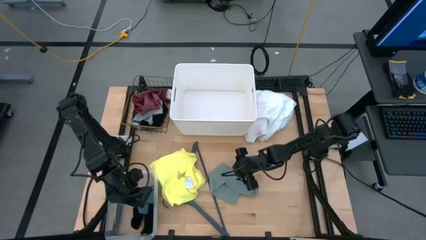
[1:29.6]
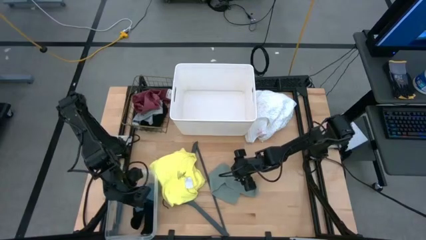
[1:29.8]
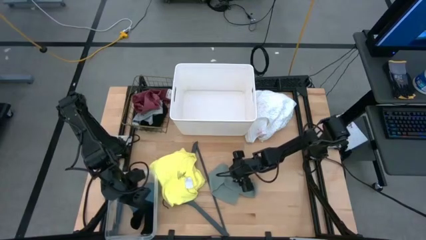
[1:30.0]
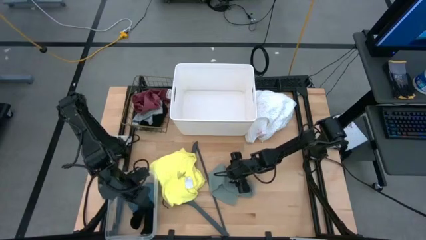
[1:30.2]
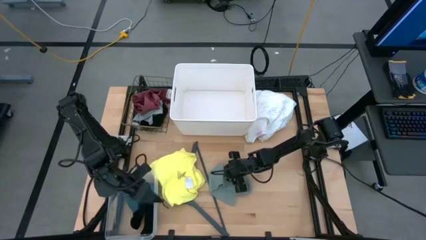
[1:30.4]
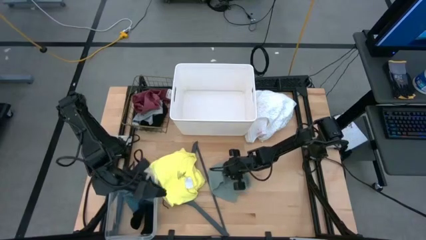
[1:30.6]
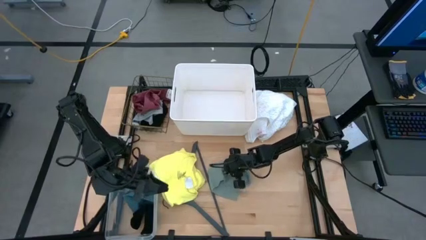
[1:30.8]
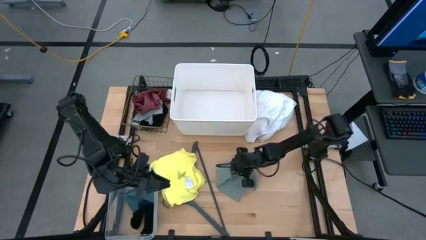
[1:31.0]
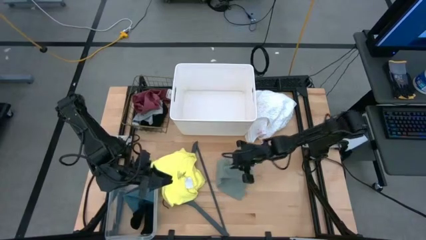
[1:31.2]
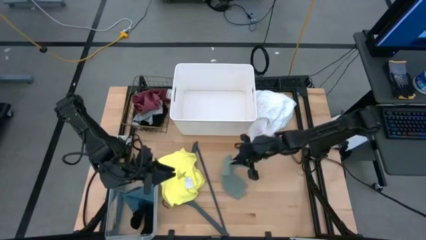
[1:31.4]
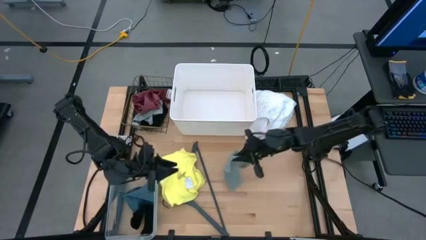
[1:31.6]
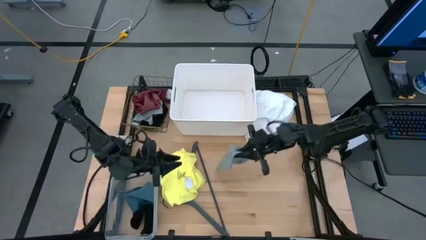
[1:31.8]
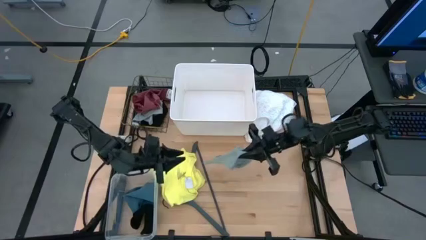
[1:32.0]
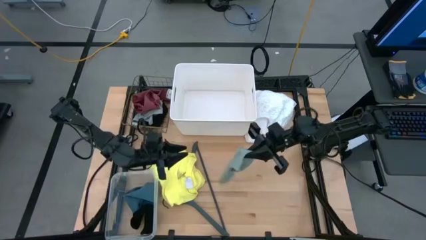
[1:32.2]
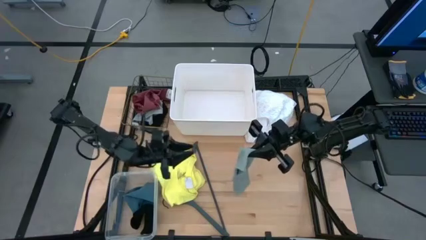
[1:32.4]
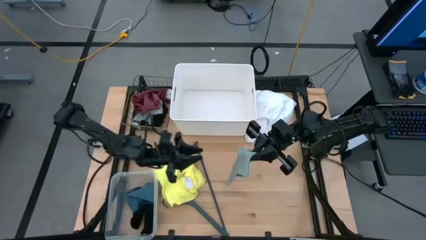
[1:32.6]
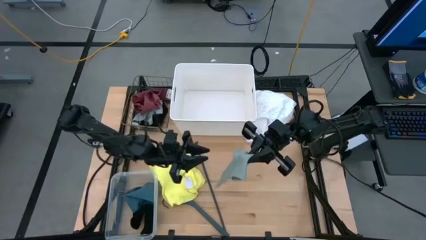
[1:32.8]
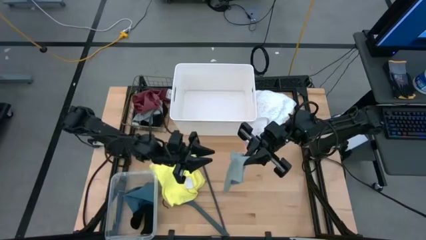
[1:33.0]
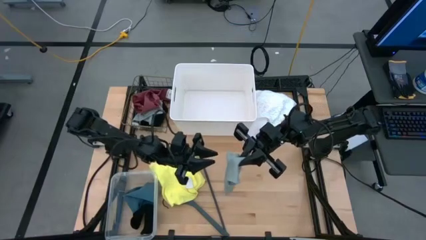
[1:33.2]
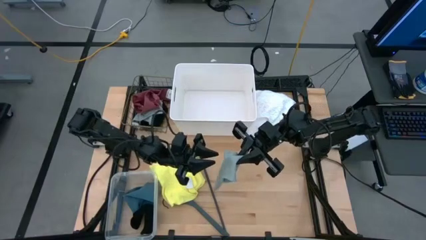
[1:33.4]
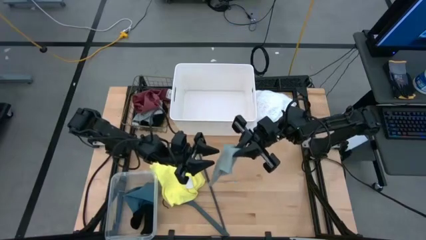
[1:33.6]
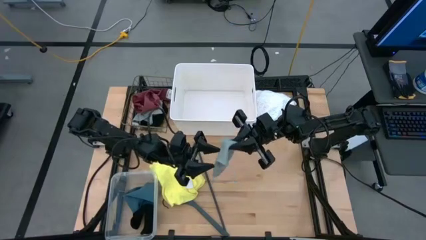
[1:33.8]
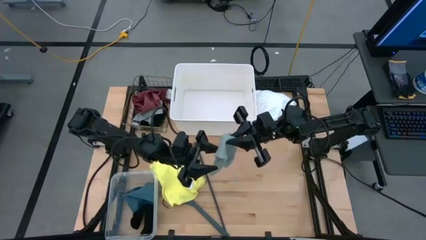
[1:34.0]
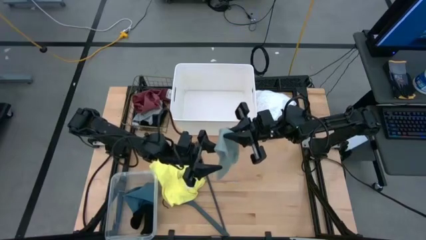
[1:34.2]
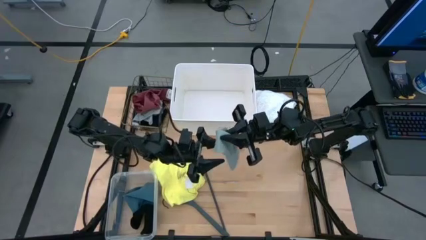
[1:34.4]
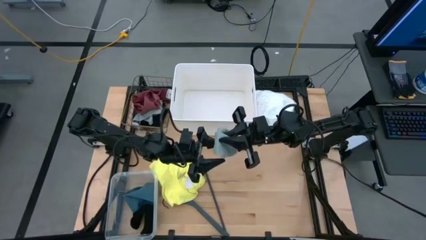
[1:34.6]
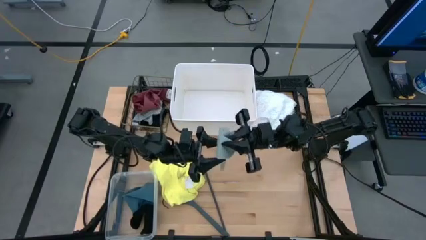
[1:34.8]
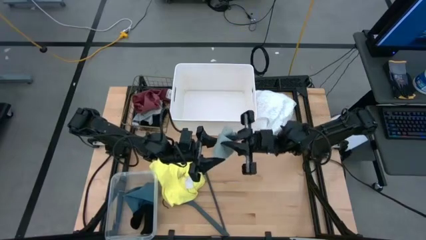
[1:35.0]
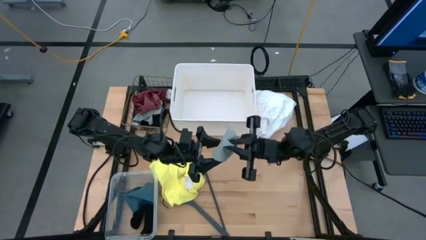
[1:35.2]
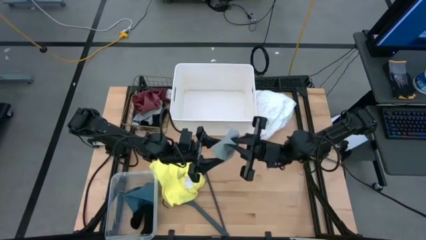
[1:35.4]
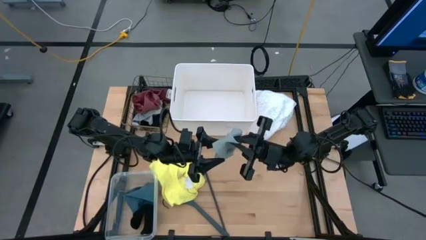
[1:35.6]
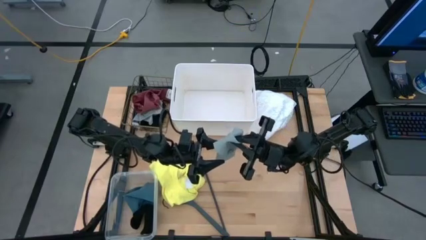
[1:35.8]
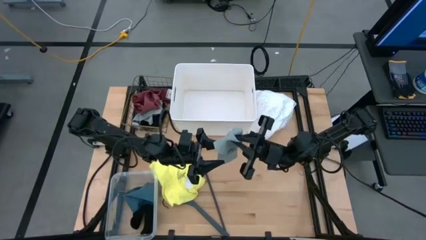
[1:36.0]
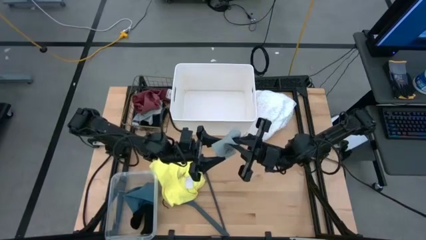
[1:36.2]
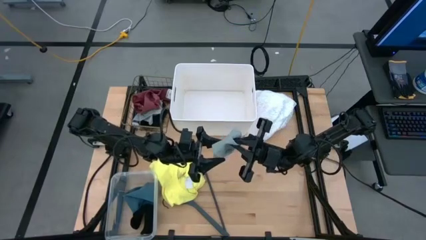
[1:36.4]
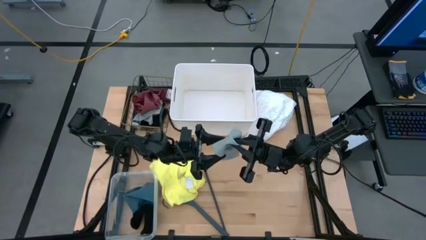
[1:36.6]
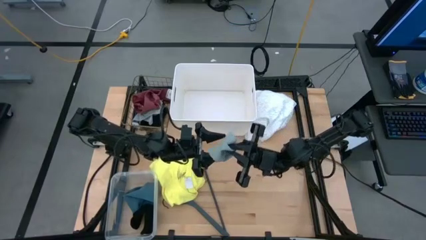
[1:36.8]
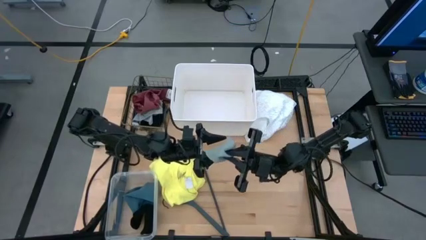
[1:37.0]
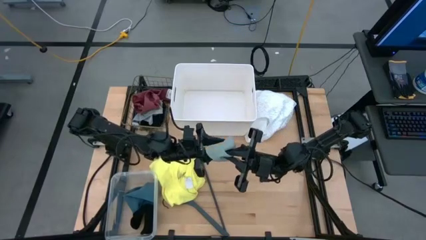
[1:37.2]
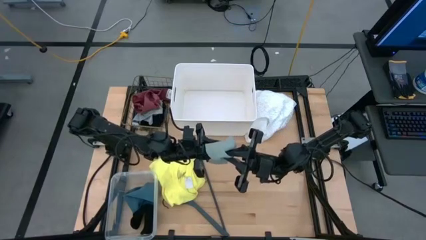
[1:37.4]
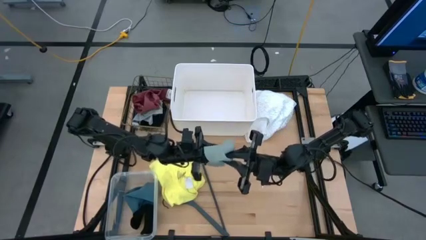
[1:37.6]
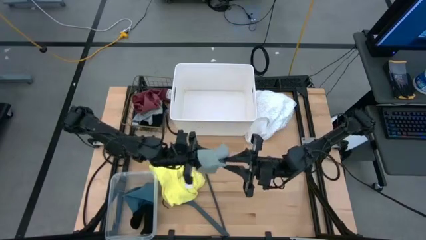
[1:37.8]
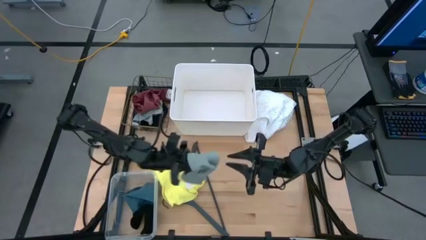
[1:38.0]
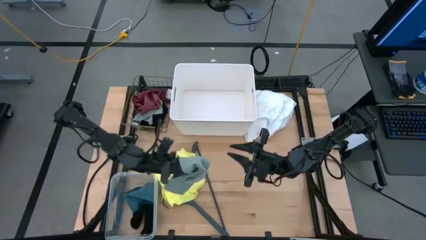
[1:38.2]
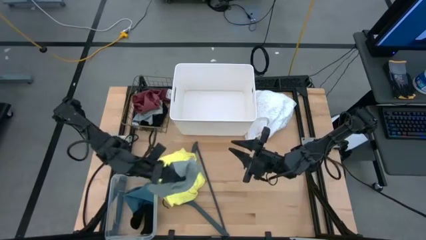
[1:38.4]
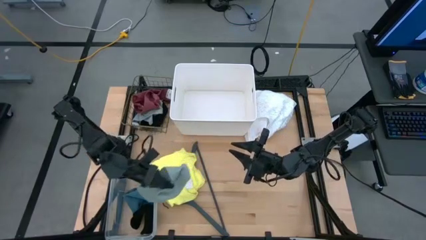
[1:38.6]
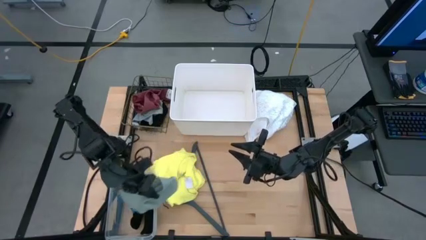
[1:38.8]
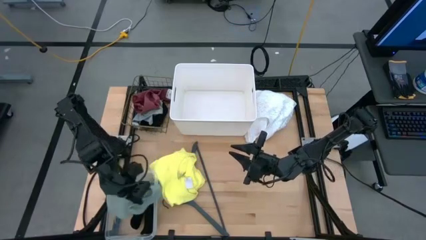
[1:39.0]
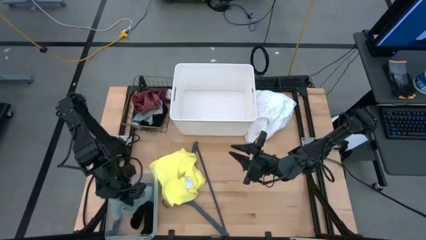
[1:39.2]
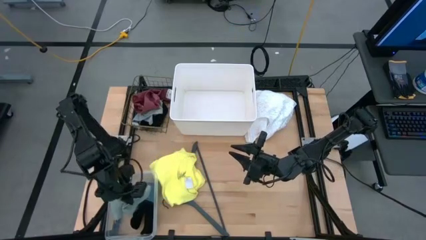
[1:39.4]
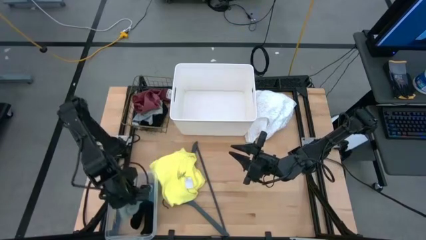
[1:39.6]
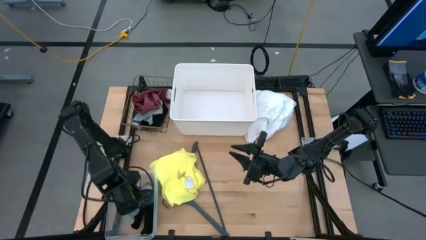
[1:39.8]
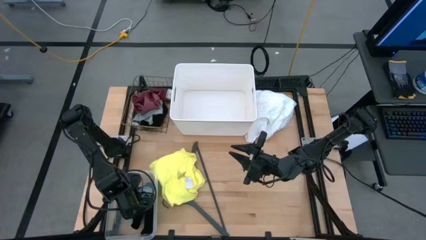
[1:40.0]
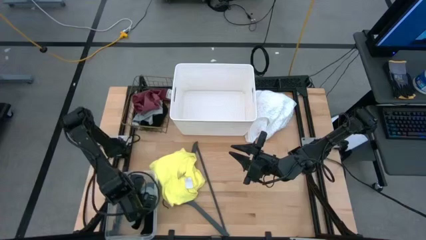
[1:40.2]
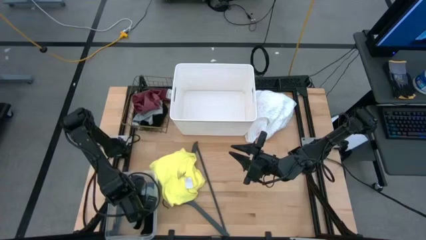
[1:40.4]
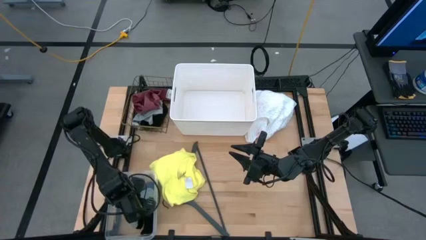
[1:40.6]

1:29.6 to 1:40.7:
Task: Pick & Place Cloths
Put the gray sock into the transparent bin

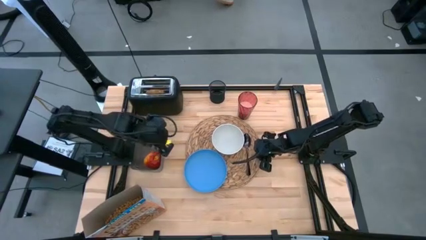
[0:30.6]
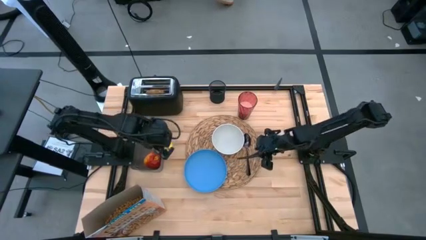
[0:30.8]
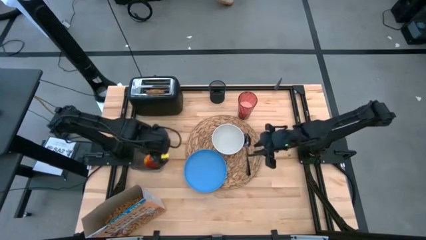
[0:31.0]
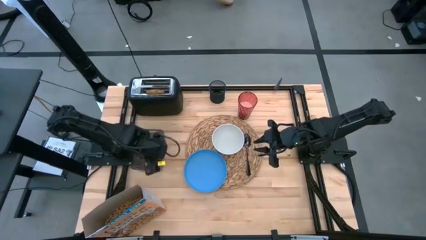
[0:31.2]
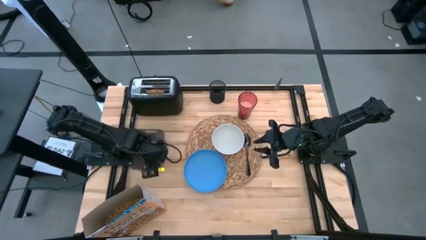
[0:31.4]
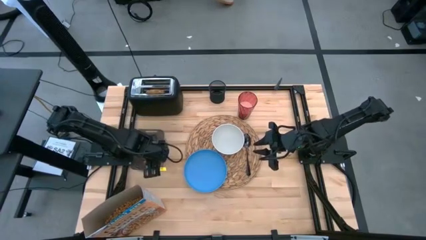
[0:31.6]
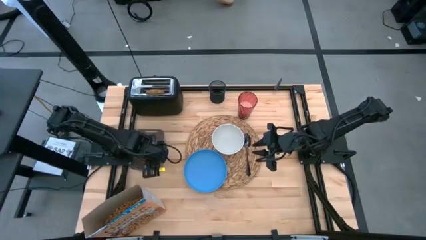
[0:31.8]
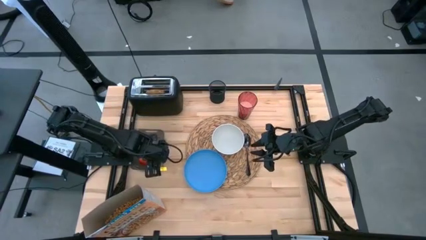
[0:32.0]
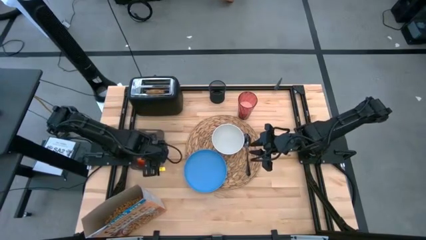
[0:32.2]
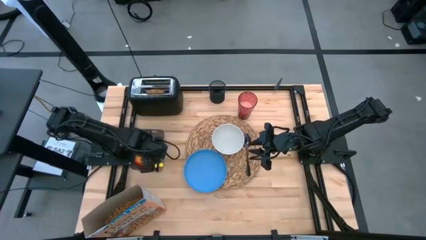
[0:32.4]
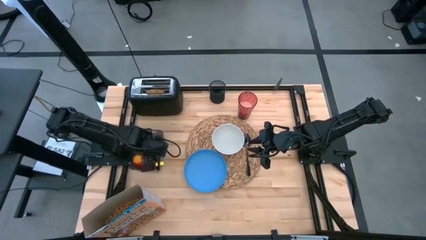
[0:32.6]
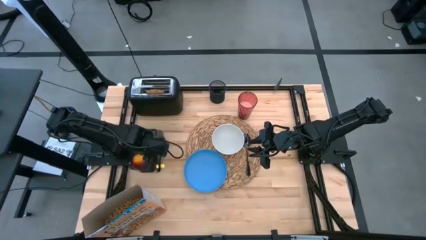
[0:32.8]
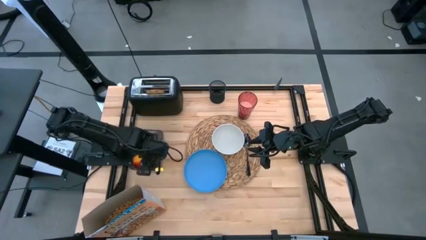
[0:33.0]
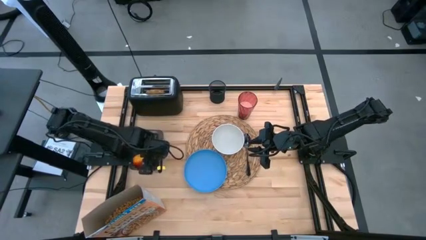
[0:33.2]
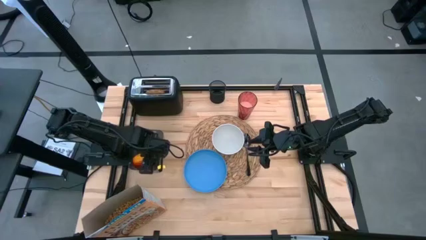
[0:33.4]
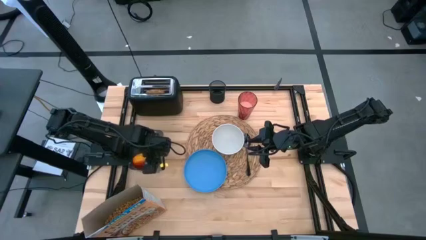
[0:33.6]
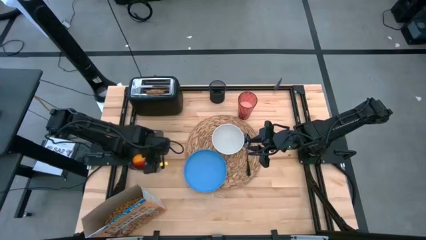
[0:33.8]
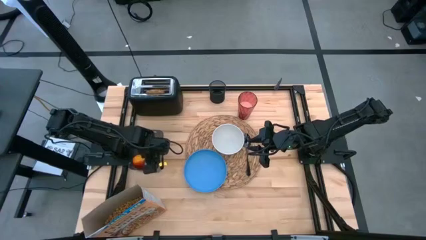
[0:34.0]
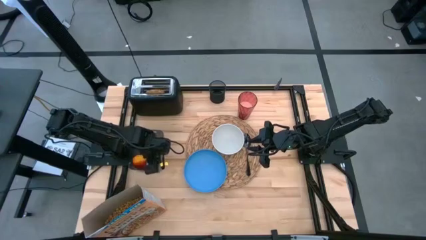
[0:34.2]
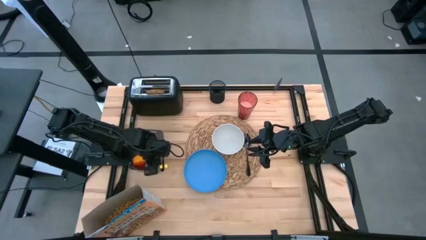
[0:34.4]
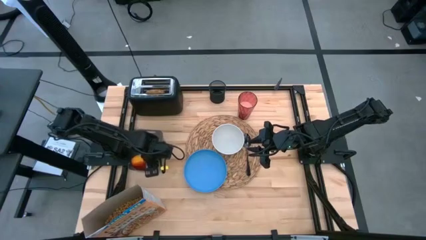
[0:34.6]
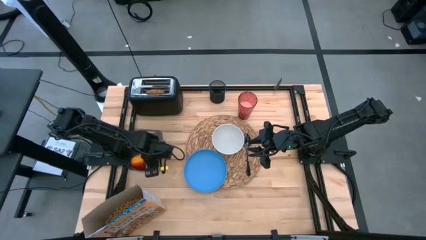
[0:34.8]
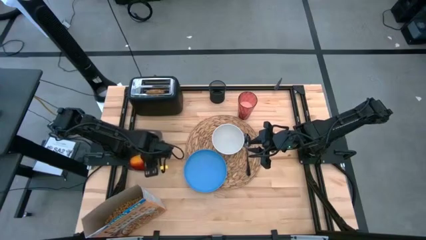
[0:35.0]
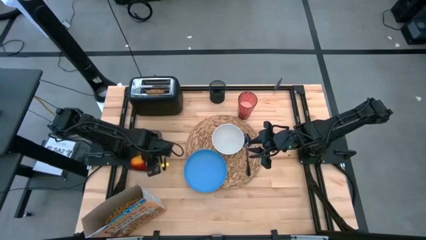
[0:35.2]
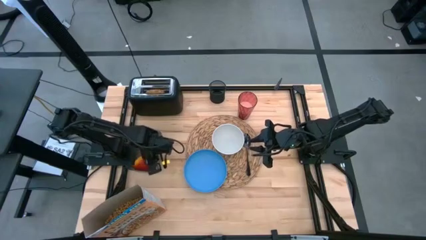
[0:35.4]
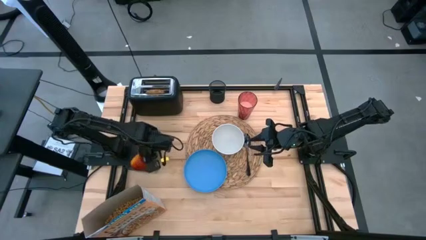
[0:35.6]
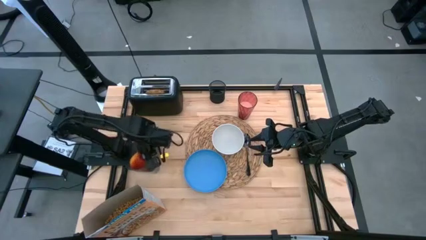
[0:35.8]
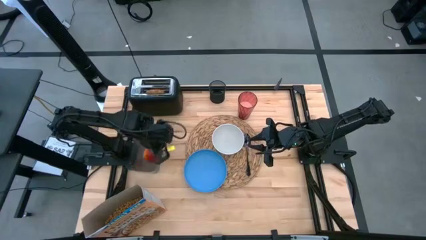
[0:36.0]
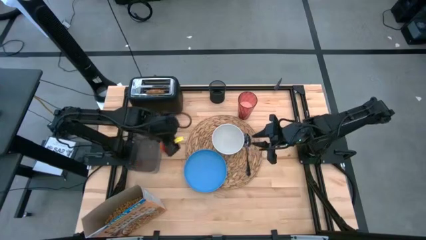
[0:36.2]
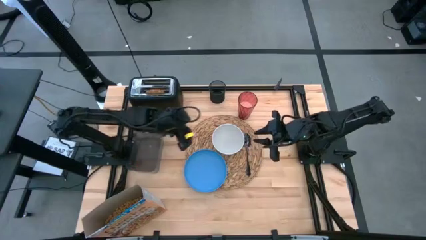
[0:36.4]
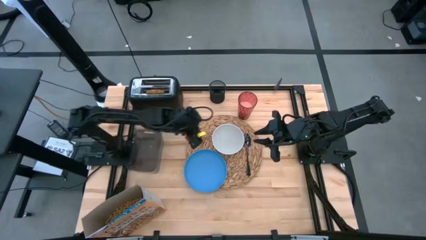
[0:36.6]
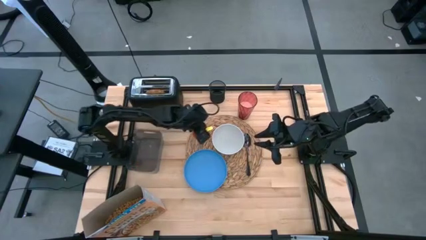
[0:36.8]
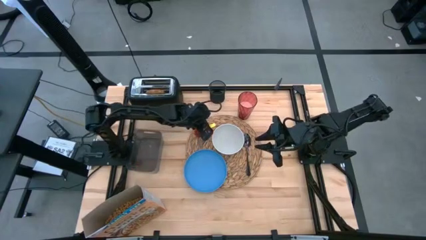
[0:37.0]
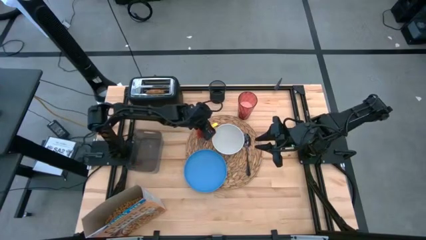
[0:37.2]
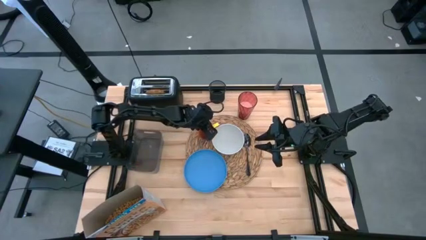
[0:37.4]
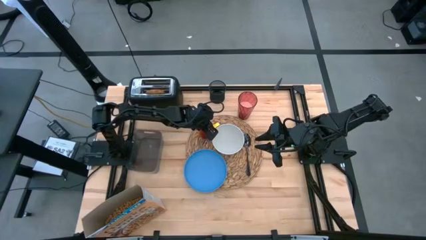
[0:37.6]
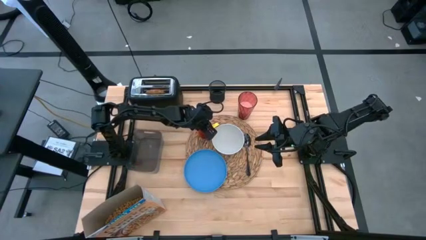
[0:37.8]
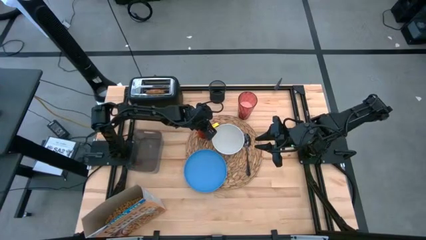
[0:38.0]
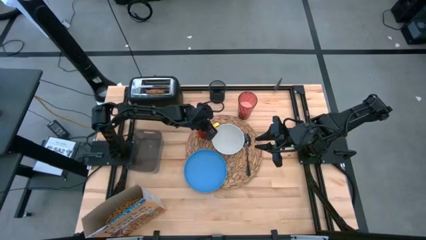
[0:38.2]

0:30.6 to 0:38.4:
Task: Arrange a breakfast setting
Put the apple from black bin on the placemat to the left of the white bowl
